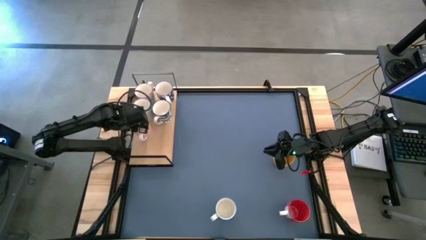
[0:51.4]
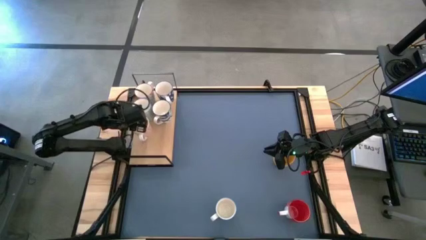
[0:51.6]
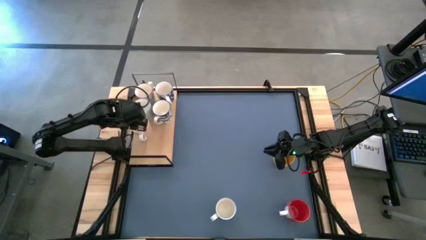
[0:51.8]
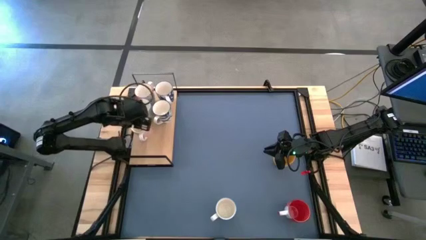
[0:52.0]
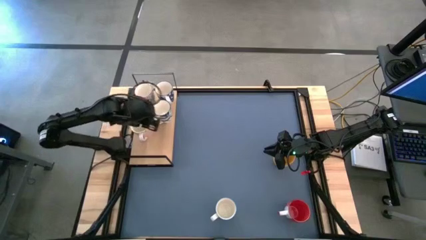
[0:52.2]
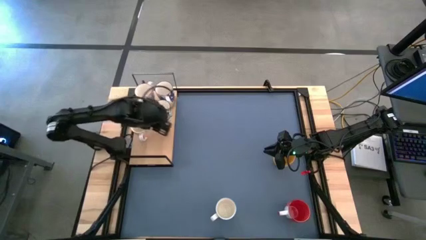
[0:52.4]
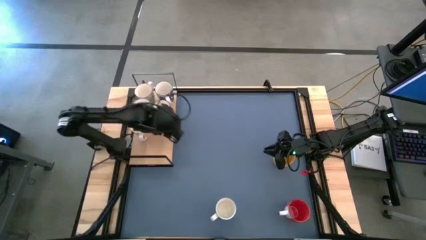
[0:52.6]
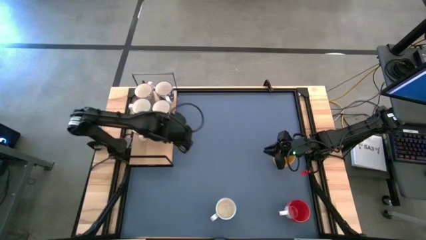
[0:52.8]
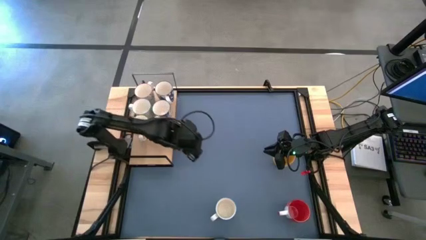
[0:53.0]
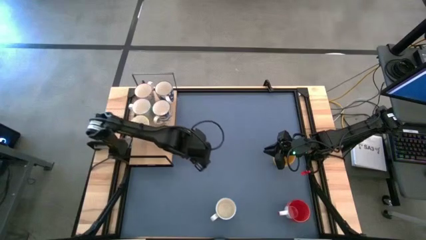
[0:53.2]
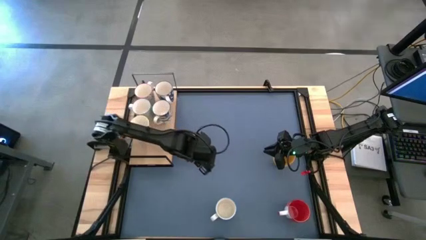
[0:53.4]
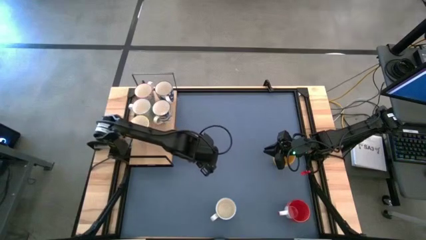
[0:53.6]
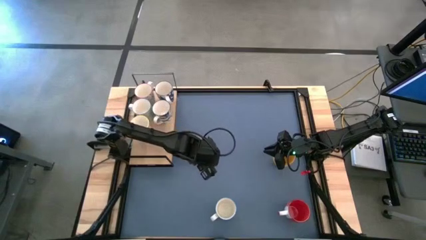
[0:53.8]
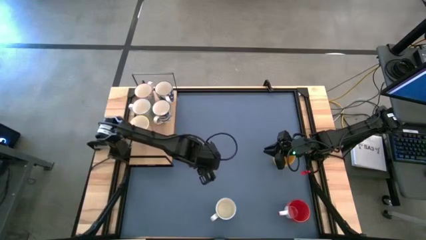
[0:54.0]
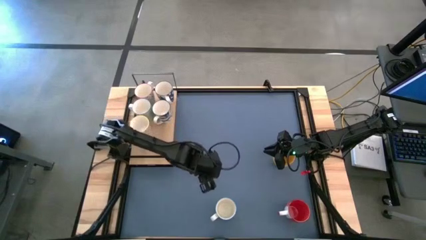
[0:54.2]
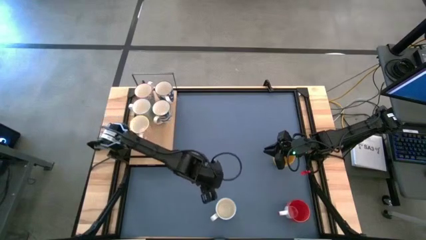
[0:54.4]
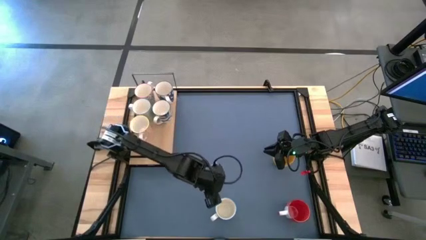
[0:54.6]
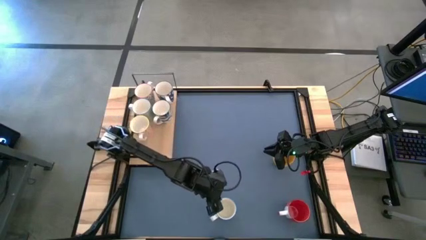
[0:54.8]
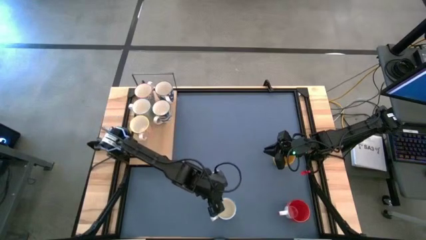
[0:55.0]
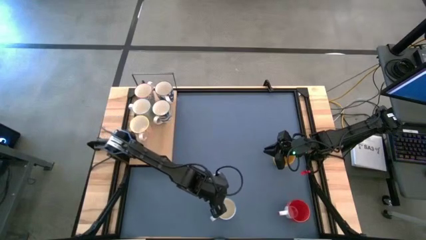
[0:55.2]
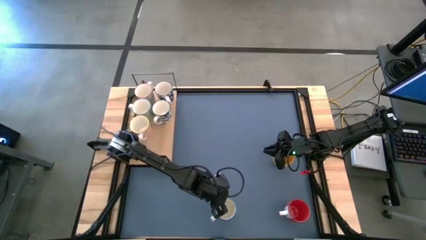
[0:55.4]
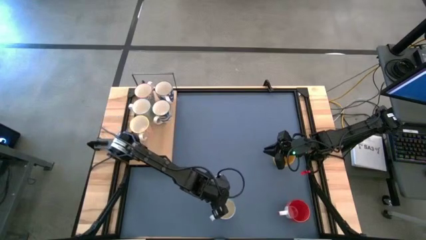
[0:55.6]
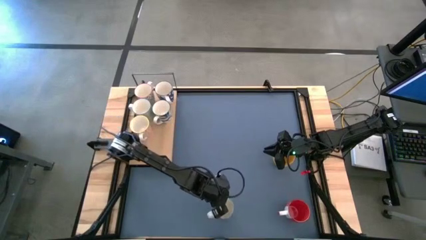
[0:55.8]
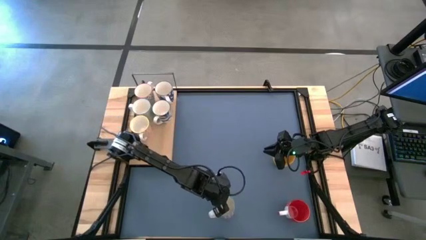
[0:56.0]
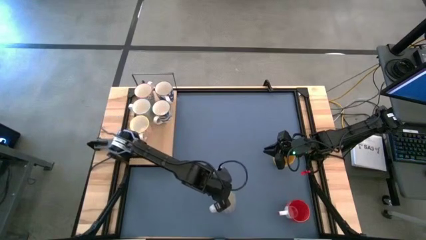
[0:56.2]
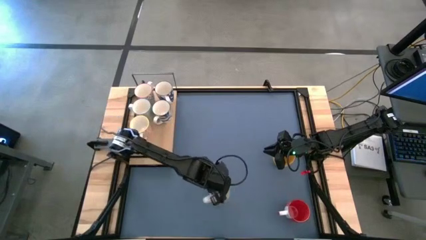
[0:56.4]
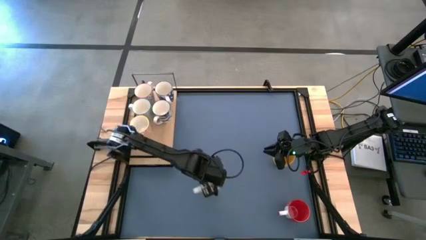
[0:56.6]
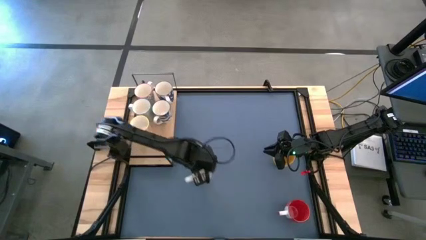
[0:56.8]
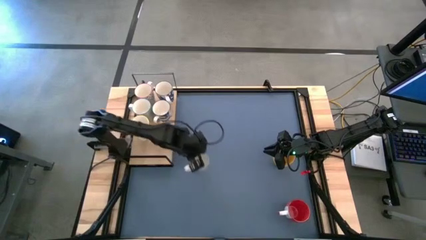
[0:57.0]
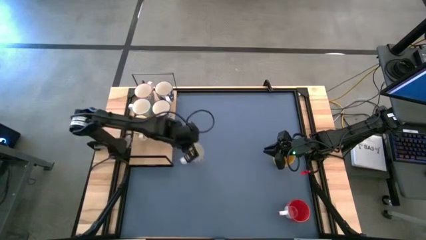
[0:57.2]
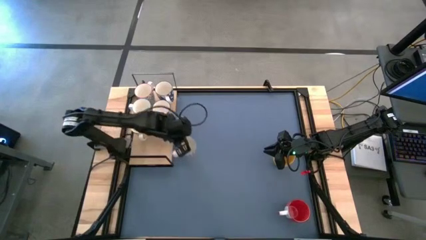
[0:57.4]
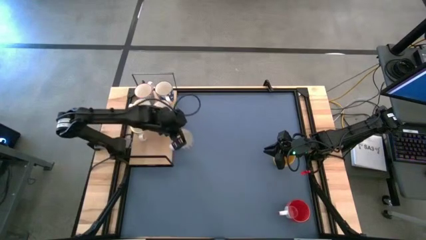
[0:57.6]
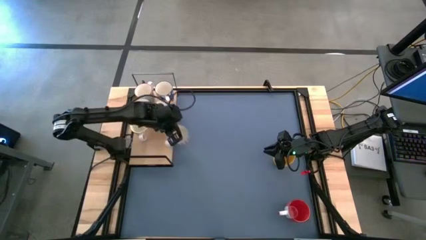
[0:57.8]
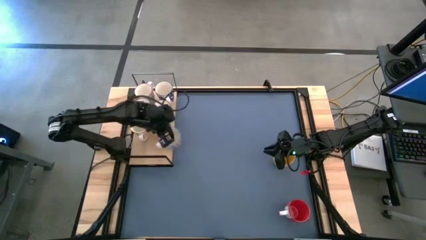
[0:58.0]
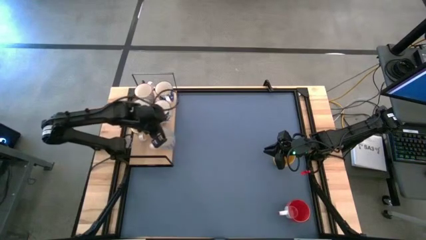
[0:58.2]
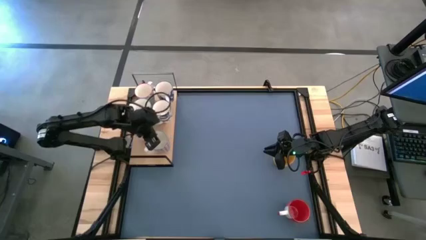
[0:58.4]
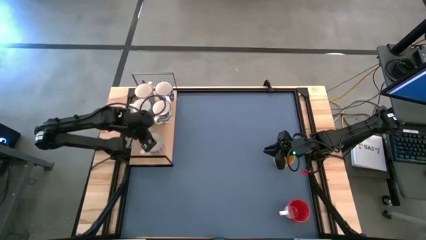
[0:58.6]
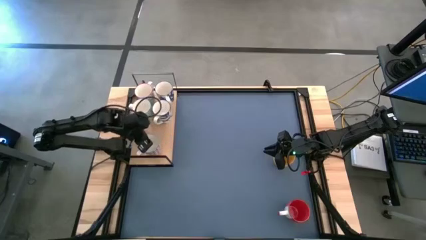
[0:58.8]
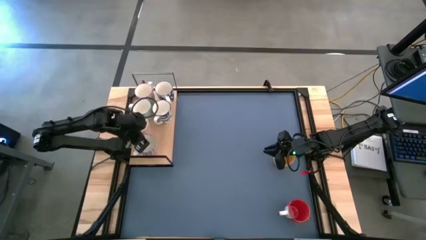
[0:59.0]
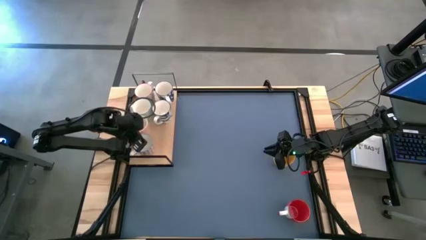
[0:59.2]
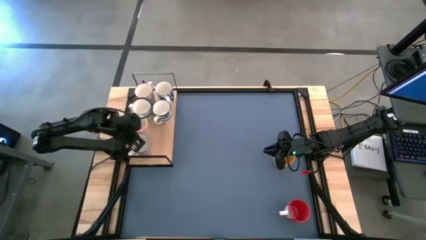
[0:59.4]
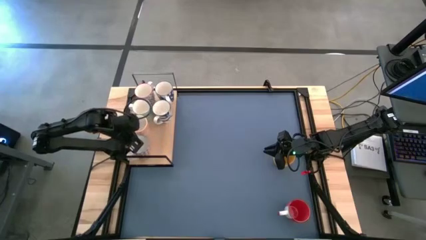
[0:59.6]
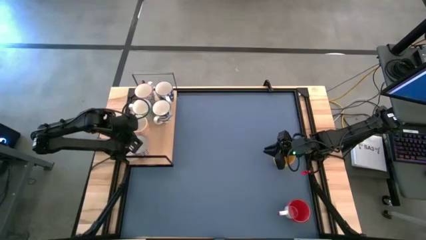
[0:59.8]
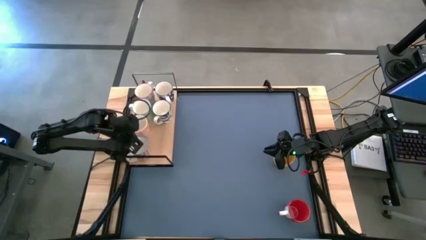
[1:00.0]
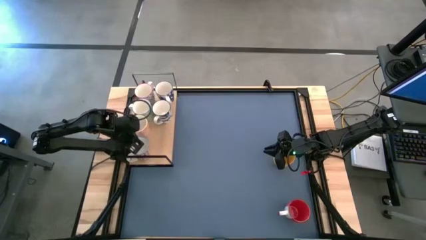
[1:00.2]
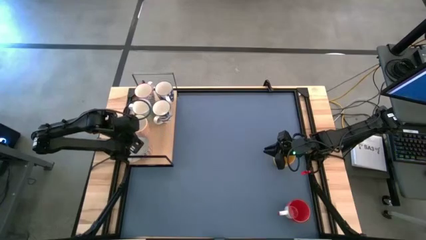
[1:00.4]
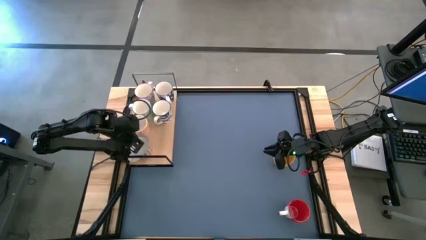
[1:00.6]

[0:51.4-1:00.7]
Task: Place coffee mugs
Put the red patterned mug on the shelf

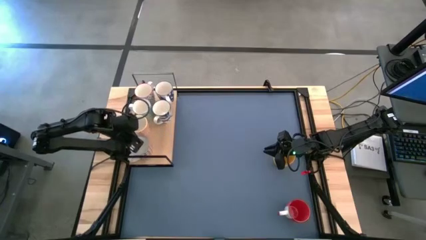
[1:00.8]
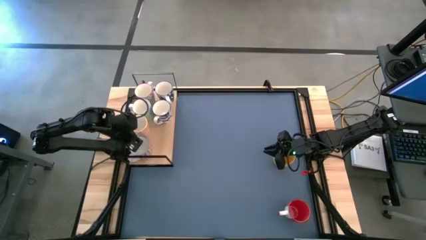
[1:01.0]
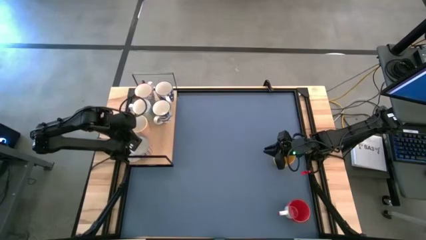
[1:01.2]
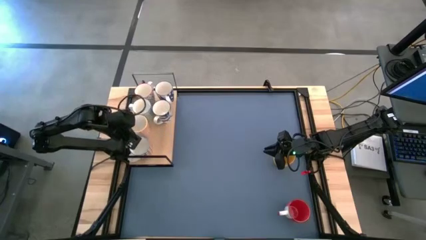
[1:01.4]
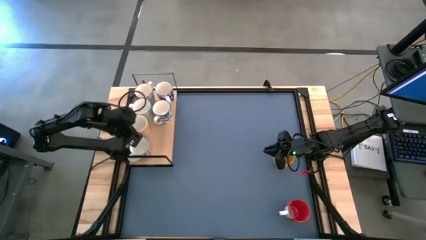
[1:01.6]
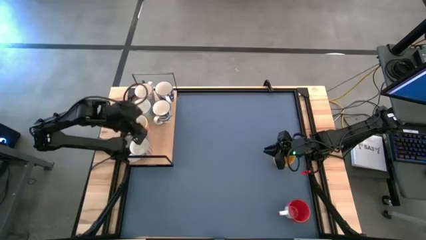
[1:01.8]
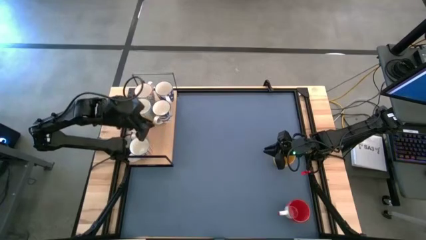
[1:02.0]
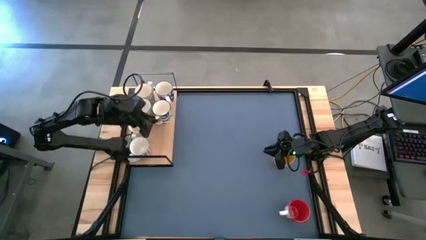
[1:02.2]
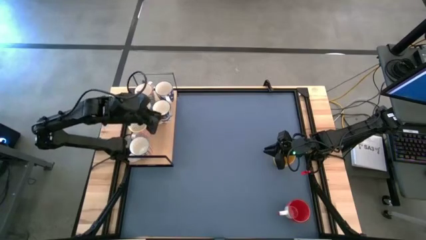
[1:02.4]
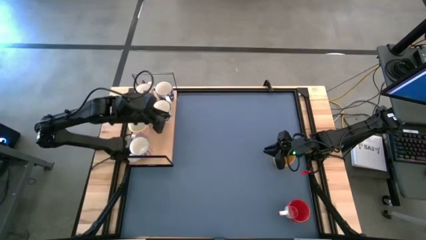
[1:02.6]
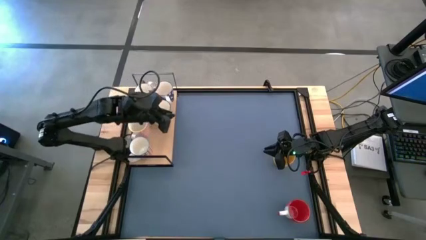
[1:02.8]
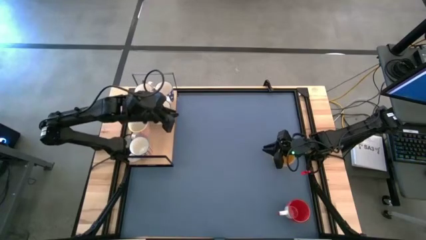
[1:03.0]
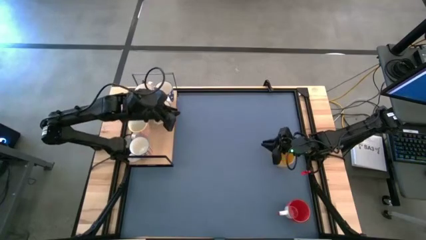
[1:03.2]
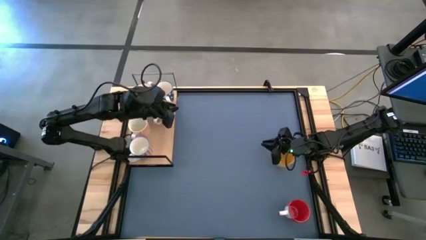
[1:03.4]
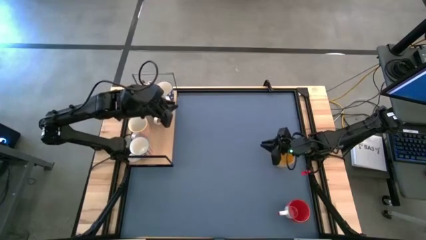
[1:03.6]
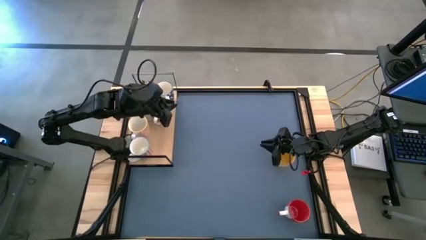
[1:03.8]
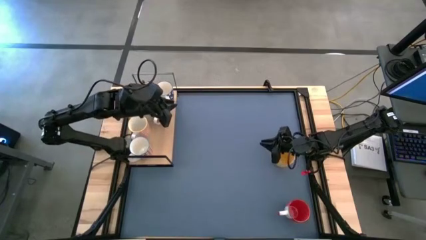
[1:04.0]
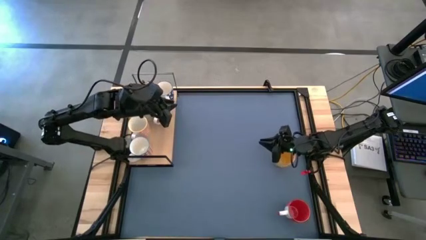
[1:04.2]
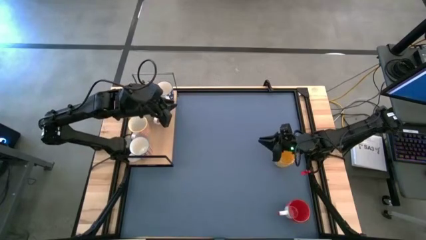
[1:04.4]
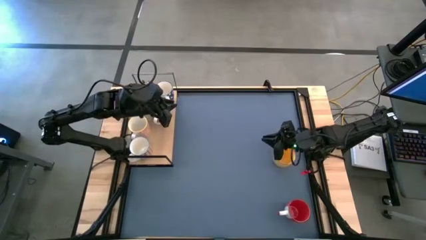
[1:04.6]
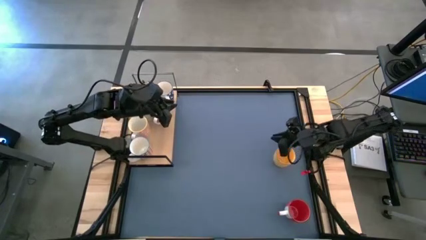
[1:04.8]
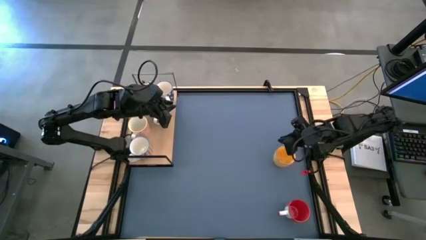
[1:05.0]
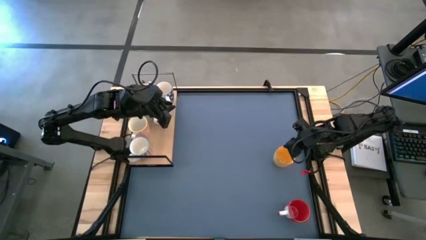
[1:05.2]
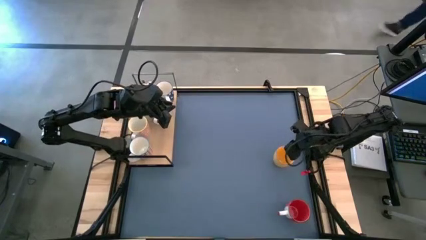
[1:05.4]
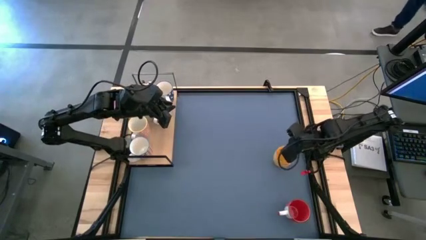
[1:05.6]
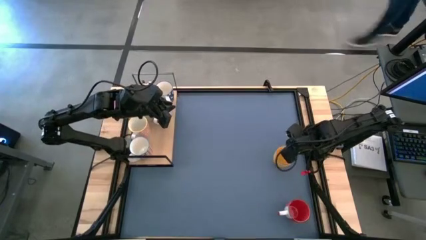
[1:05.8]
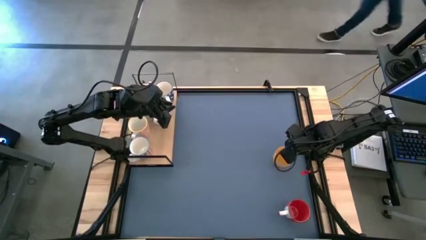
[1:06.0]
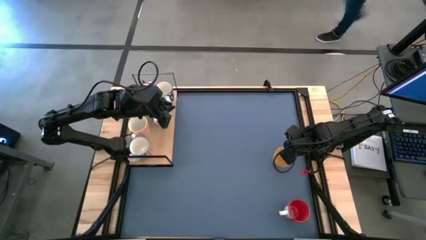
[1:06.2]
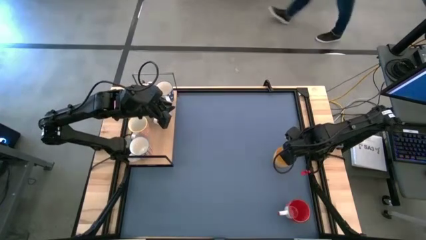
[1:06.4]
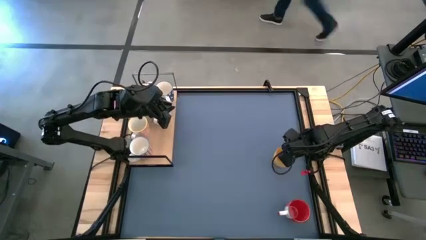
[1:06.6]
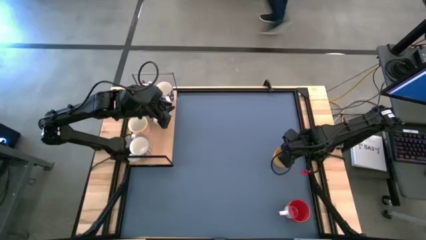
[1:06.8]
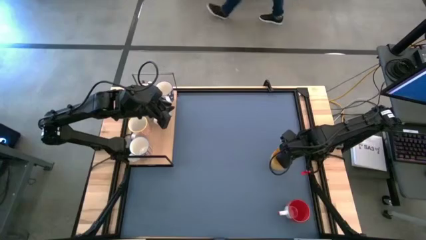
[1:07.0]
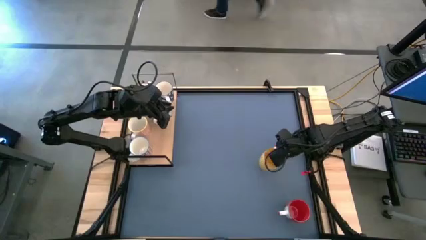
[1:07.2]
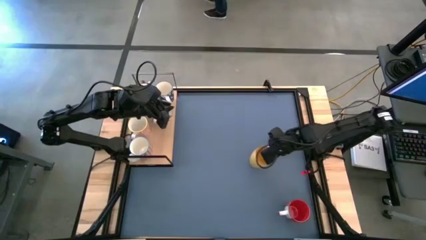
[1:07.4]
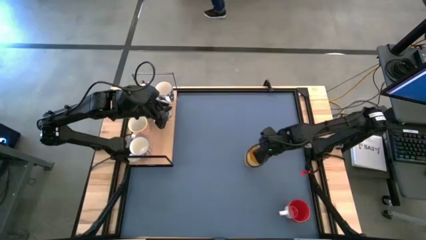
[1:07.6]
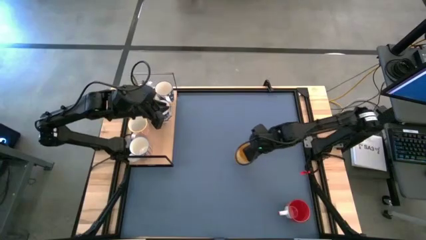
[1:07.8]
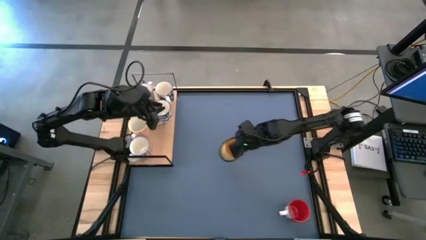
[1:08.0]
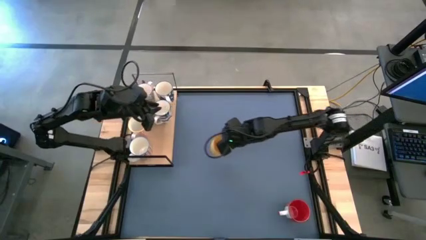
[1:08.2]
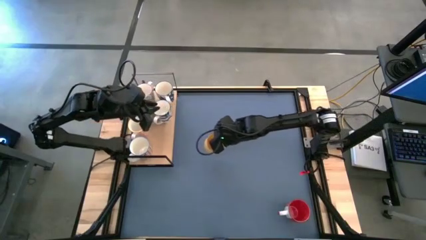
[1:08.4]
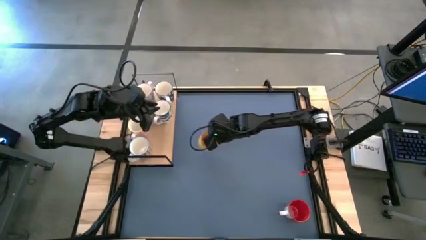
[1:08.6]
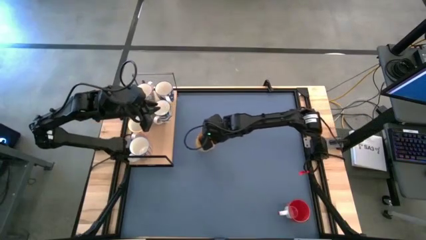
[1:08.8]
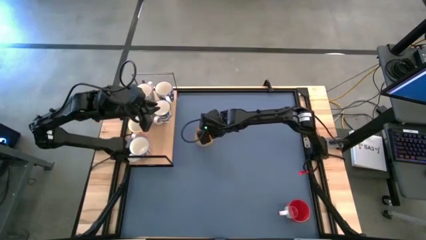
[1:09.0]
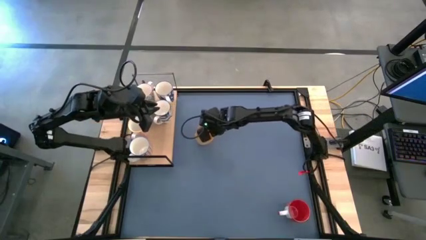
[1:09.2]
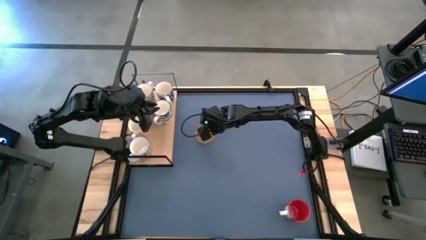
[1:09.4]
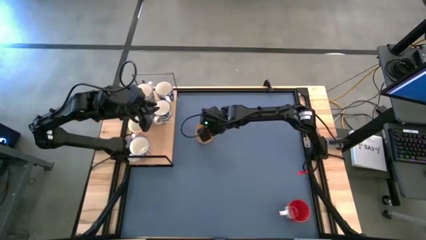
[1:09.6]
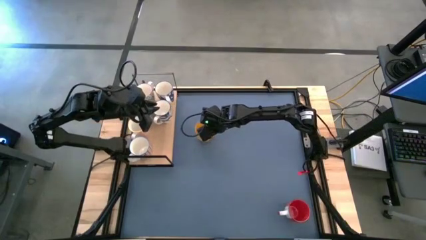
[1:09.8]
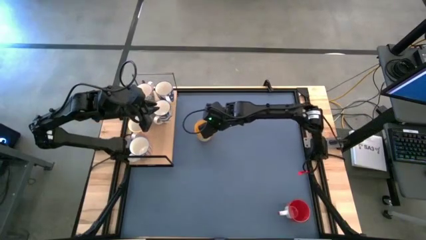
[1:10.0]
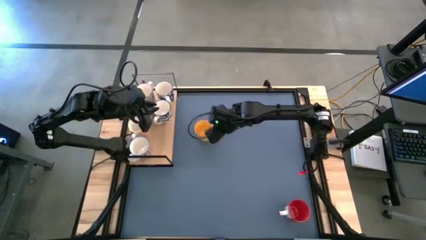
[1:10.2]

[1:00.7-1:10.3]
Move the yellow mug from the middle right to the top center of the table
